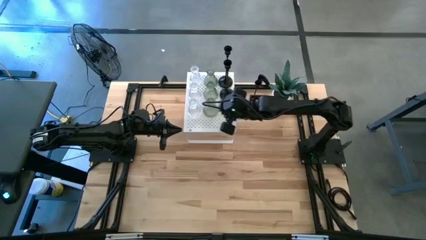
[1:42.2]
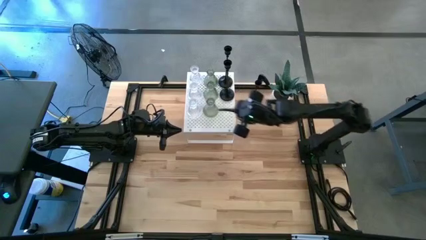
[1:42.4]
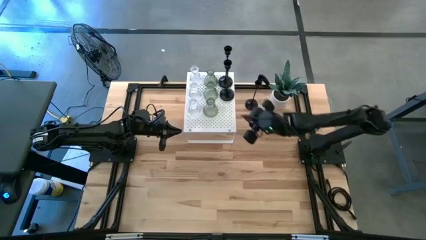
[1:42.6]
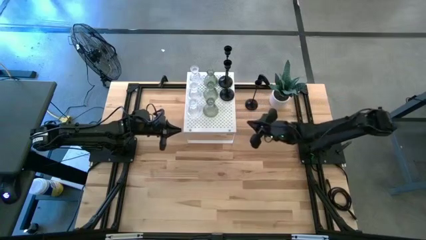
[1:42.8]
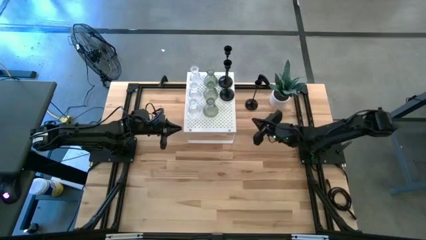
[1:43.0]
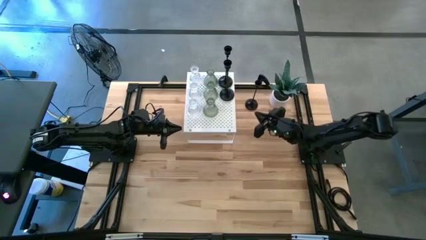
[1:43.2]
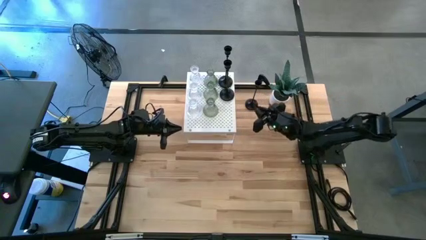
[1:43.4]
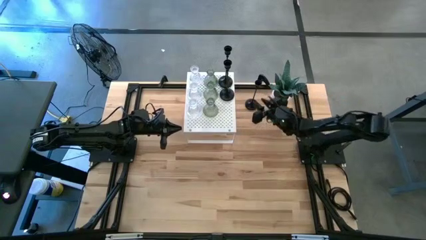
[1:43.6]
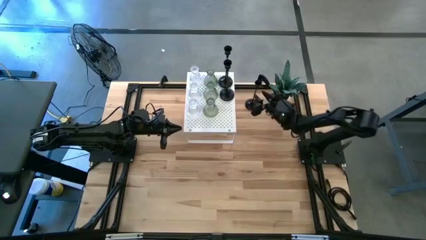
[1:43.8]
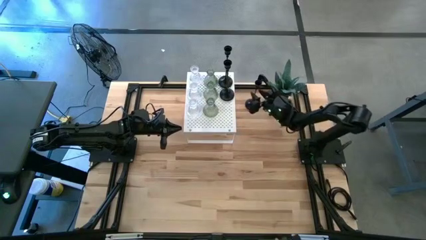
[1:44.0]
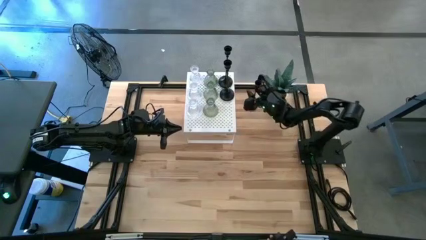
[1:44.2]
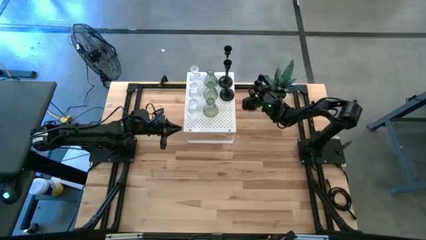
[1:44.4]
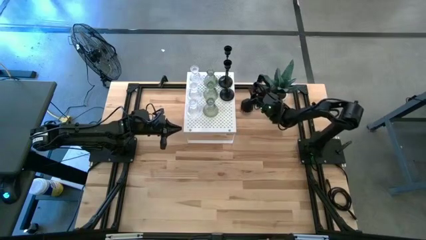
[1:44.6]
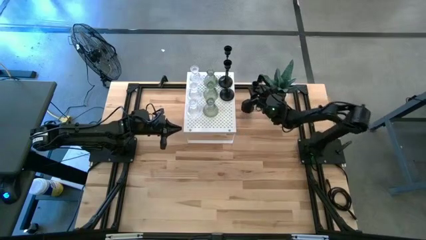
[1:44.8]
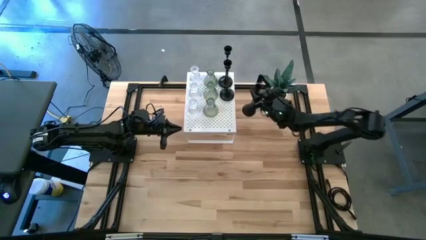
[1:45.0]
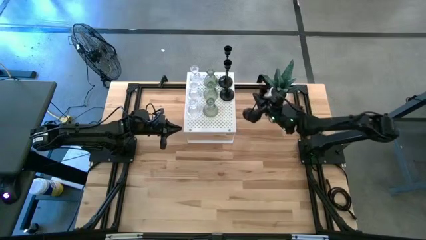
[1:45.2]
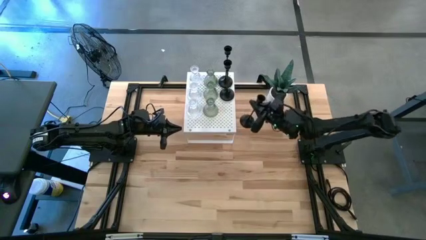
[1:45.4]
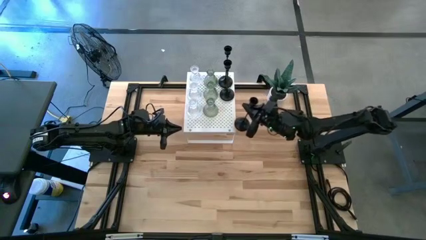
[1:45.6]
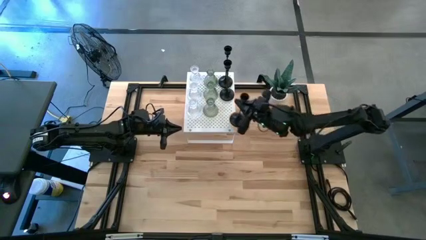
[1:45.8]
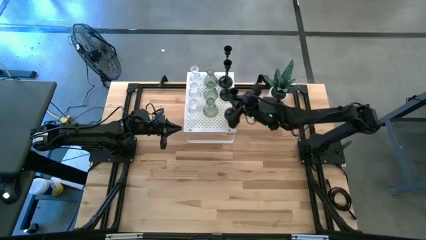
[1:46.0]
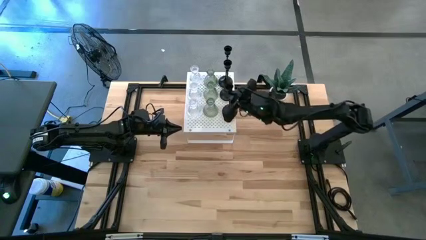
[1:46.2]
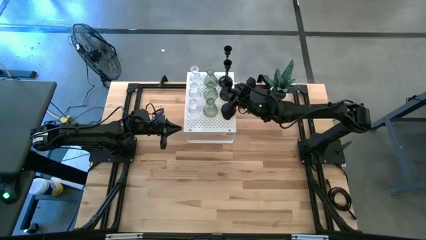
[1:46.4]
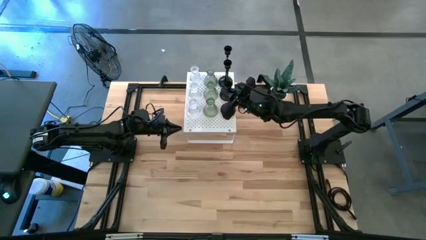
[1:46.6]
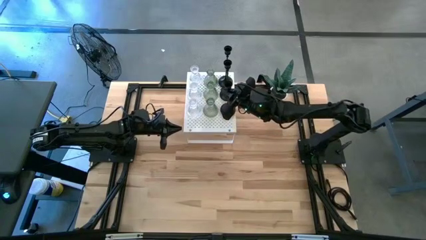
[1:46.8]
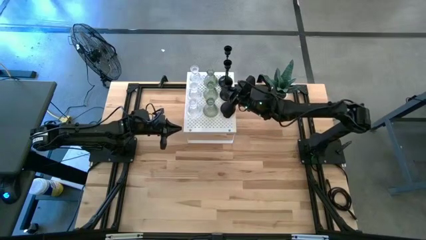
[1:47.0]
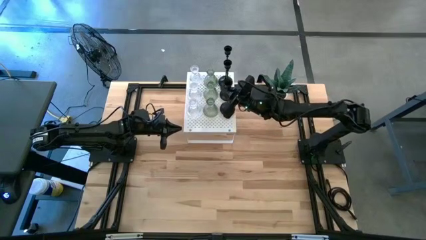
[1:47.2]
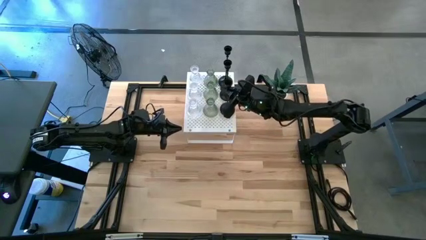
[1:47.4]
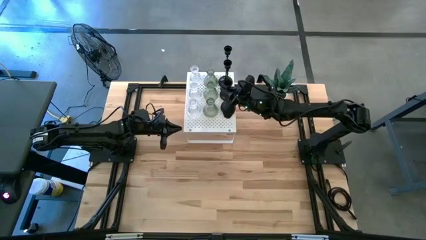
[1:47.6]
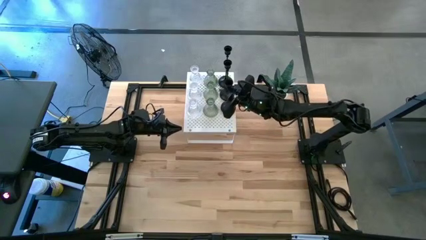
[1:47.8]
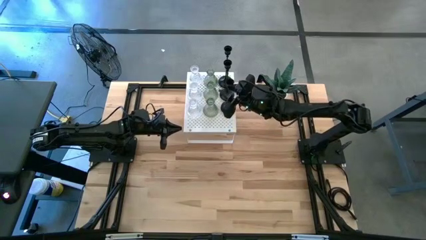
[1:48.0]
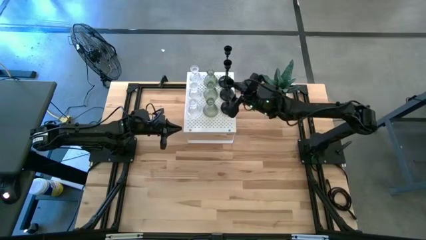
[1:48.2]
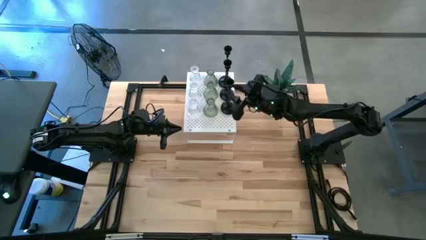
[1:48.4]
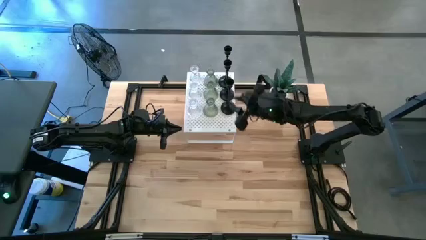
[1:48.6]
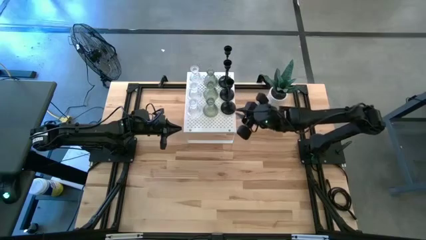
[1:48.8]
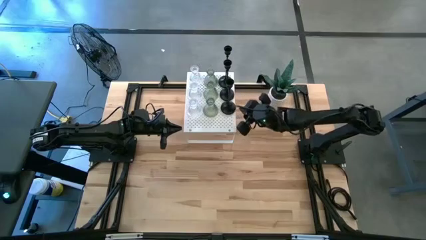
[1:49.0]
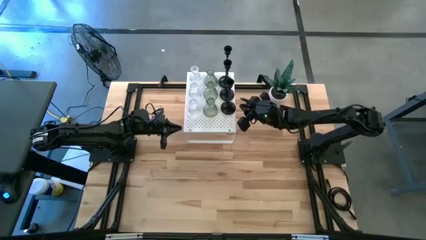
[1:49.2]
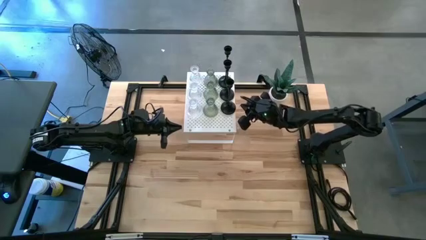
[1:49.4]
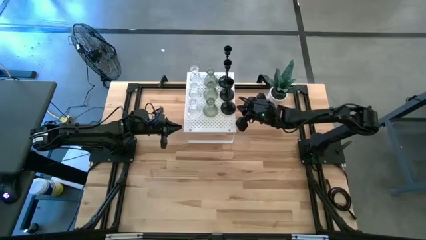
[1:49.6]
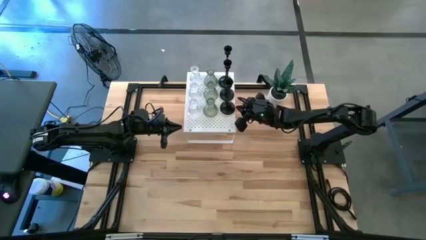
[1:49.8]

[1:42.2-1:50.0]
Task: Pick & Place candle stick holders
Put the black candle holder on the shelf aligned with the other black candle holders

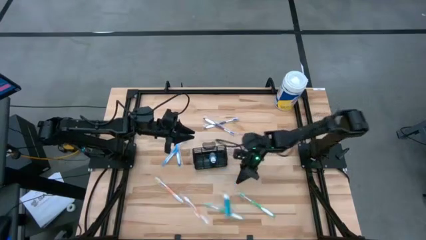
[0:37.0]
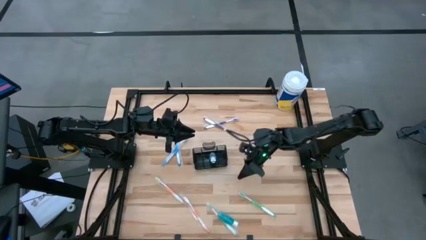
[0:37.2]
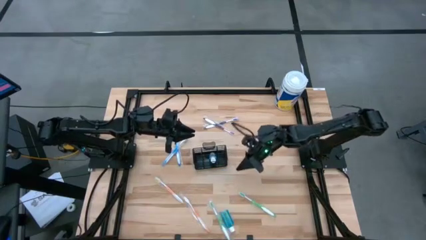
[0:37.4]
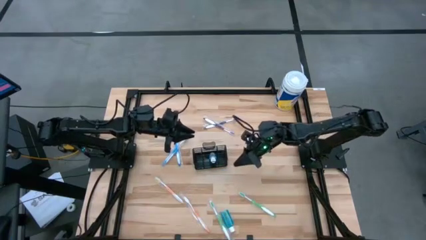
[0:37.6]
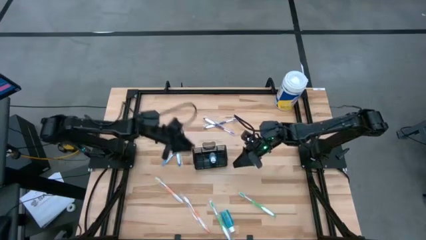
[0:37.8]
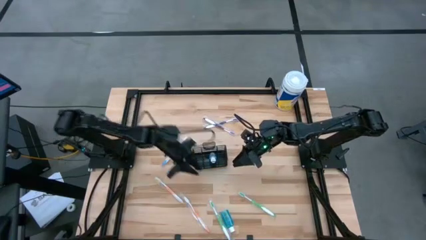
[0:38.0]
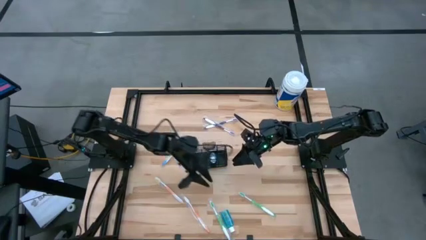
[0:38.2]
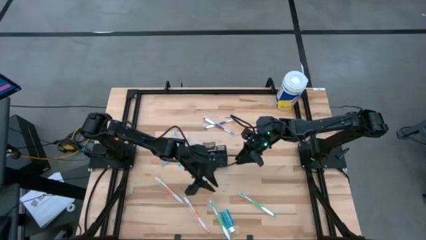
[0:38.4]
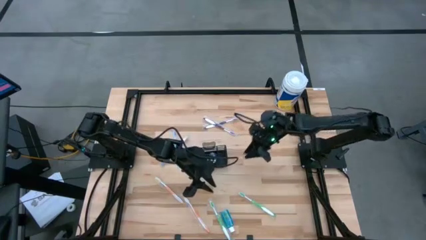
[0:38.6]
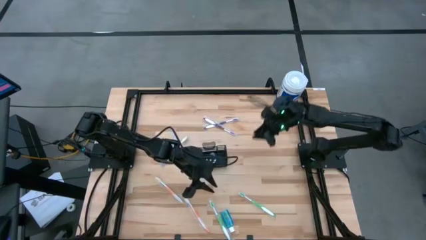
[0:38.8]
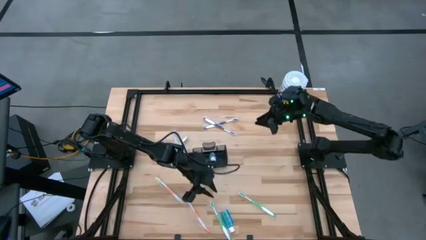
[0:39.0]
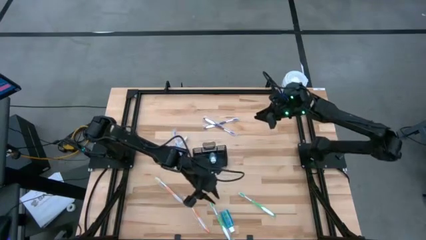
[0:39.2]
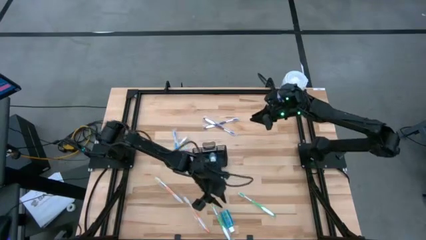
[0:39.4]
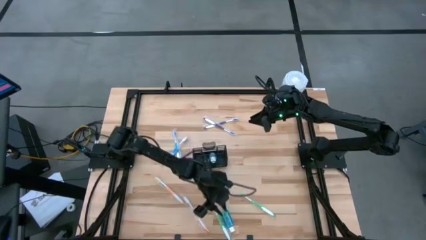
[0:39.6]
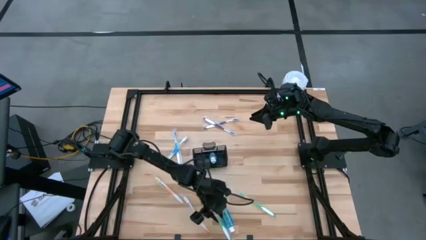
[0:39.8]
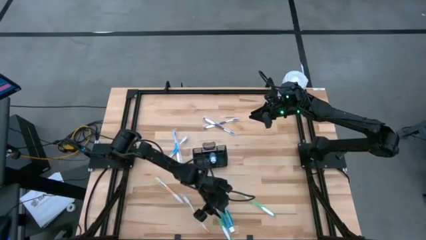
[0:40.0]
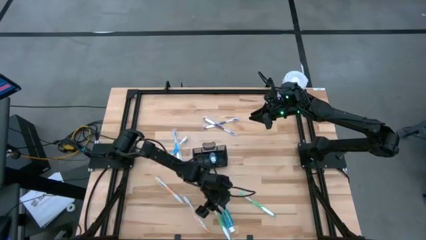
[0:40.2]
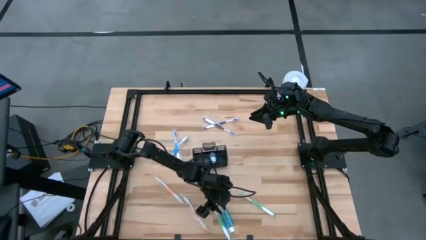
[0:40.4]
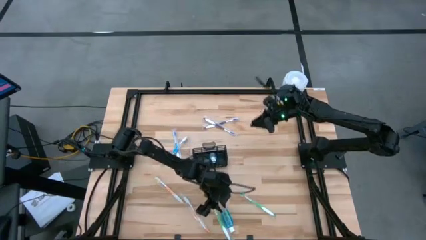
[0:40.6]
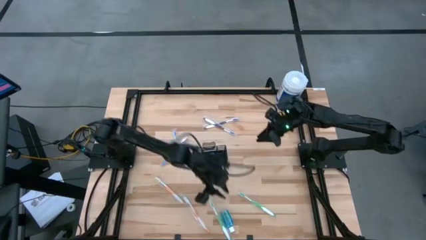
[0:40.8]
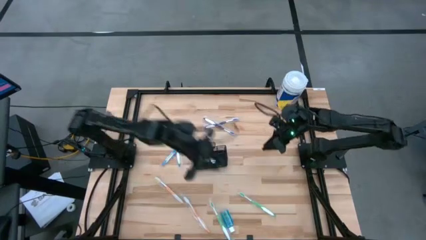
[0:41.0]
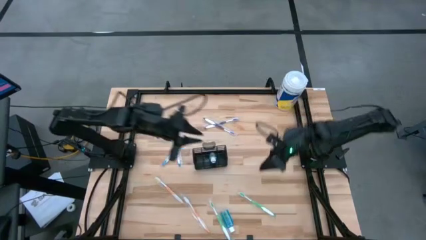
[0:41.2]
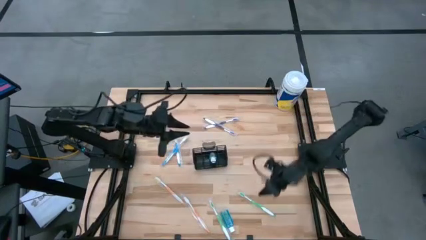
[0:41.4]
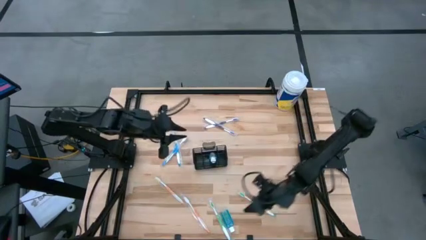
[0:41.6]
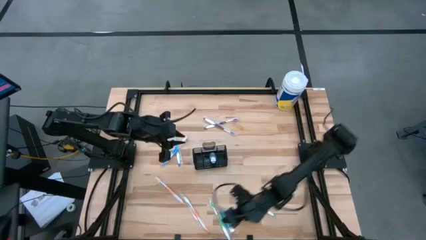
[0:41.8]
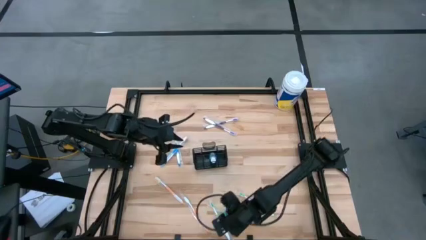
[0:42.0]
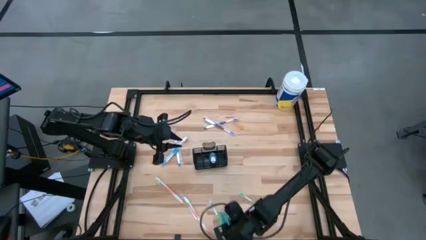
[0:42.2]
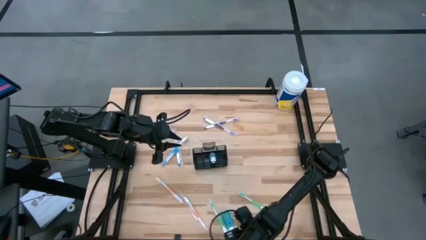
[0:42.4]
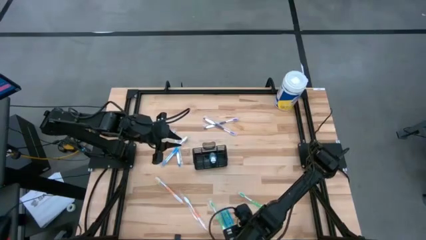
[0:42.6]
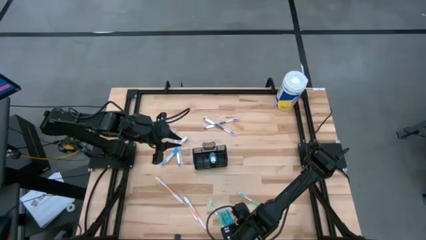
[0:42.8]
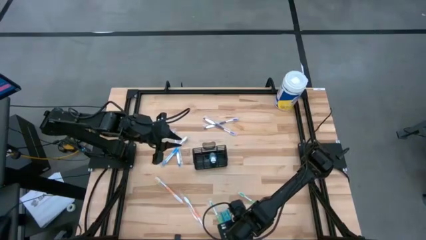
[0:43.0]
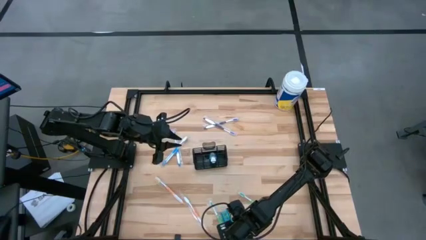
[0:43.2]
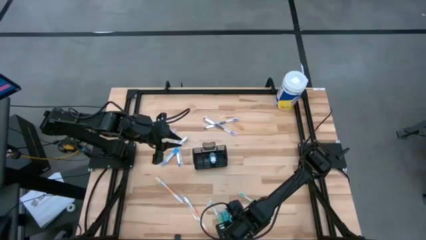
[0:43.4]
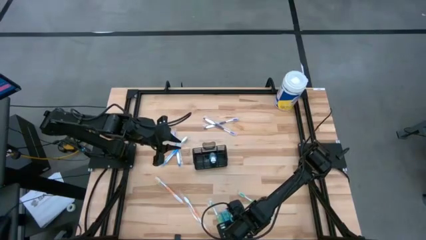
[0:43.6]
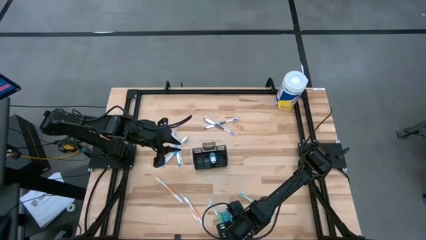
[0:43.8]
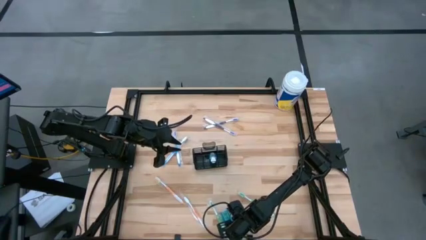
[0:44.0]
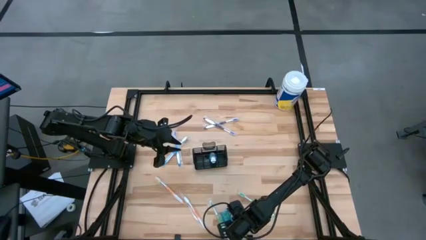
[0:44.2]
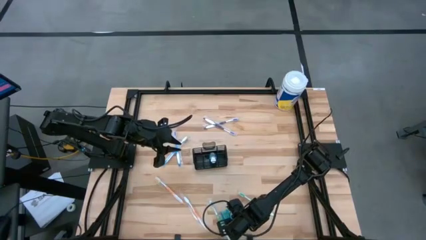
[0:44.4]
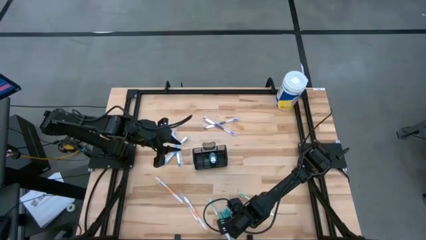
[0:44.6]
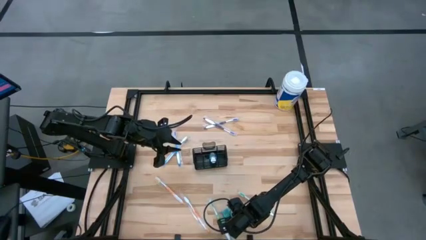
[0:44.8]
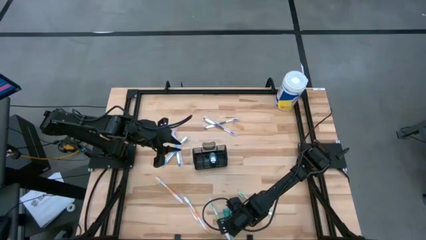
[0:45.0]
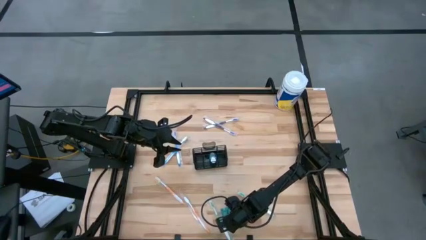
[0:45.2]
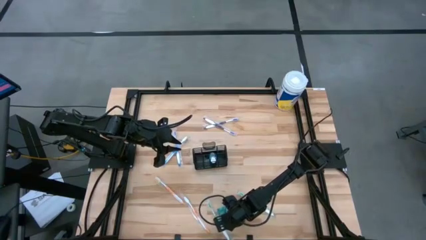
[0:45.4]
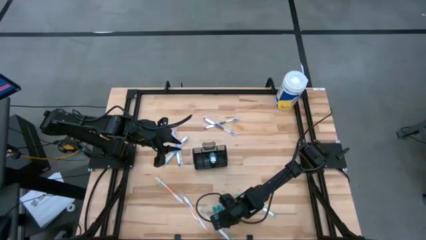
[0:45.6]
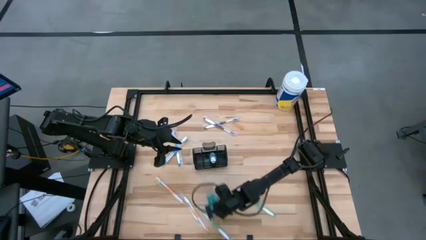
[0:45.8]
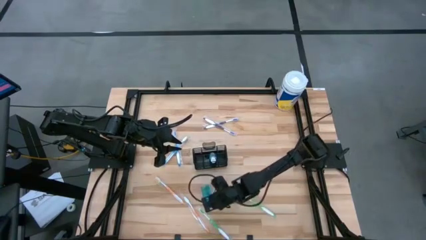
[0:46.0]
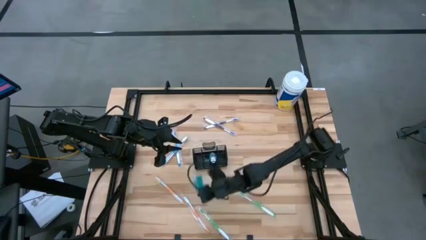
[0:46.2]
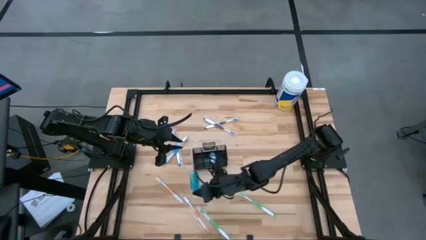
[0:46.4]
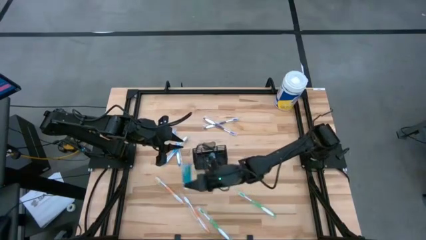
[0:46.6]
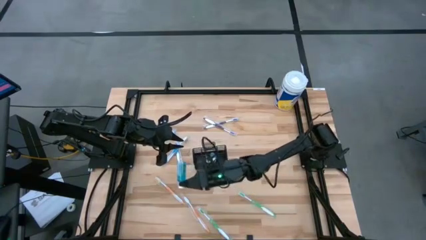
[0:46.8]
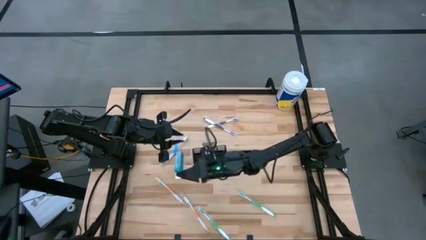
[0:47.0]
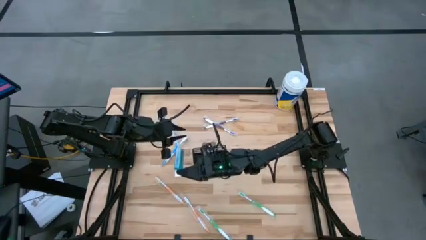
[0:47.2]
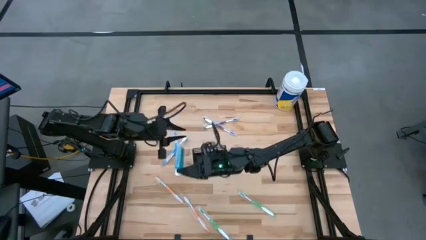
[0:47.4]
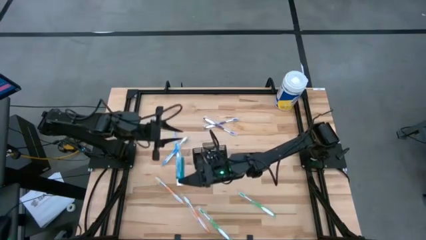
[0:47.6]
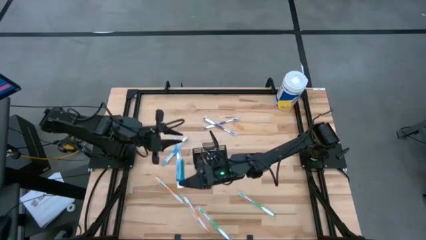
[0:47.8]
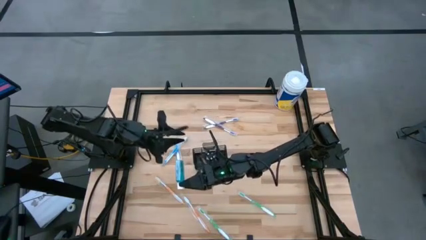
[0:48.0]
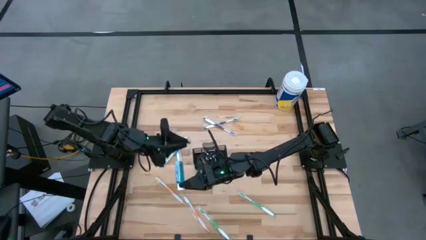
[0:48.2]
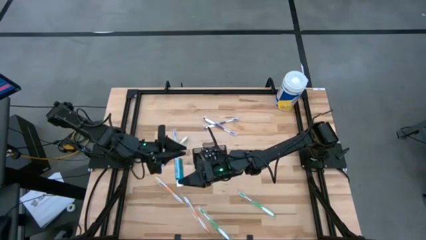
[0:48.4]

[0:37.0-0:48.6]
Task: Pick & Place toothbrushing station
Put the blue mouthwash into the mesh organizer
